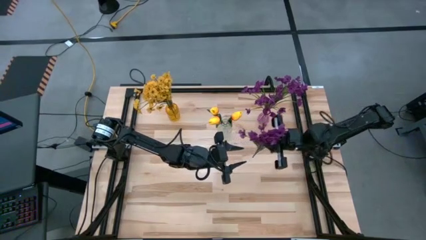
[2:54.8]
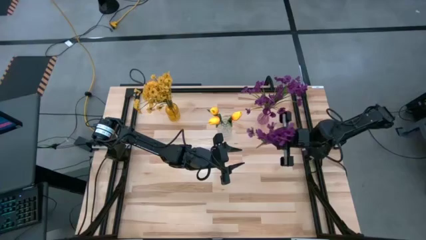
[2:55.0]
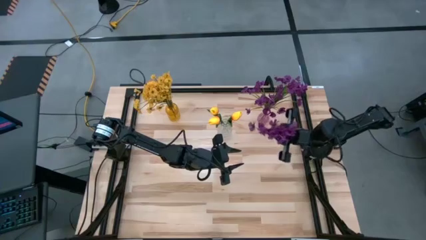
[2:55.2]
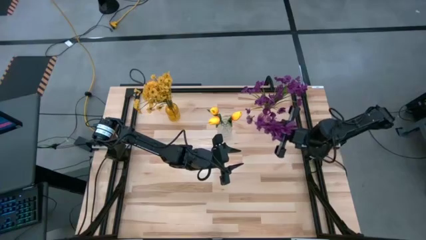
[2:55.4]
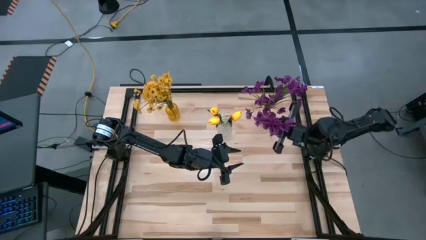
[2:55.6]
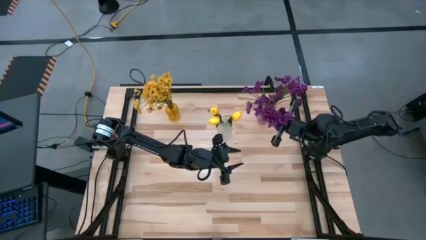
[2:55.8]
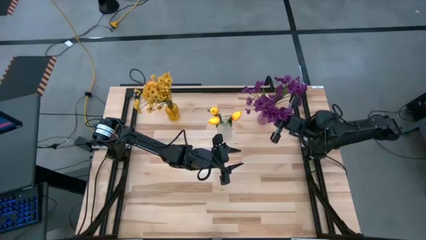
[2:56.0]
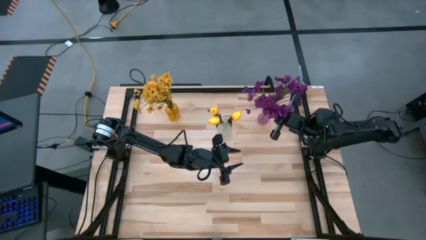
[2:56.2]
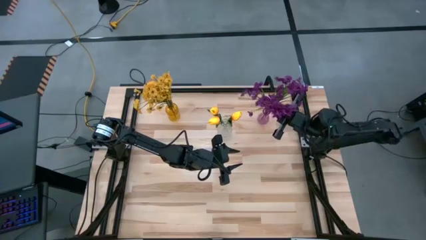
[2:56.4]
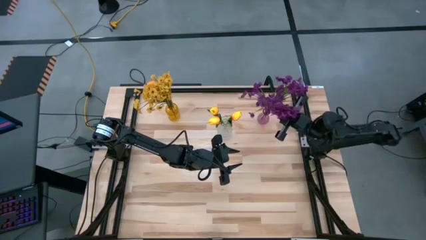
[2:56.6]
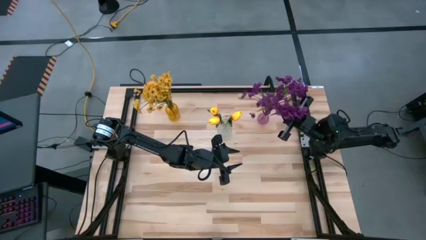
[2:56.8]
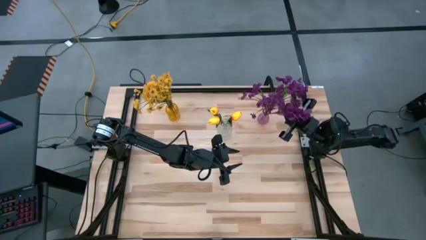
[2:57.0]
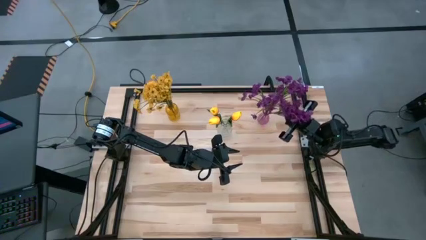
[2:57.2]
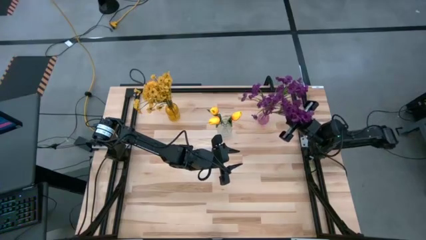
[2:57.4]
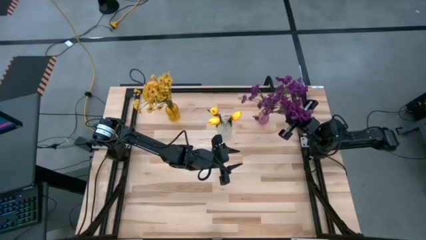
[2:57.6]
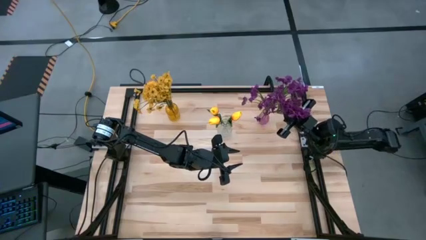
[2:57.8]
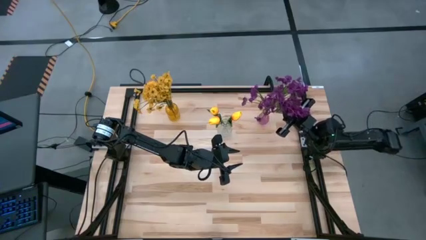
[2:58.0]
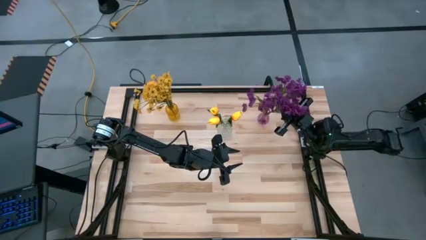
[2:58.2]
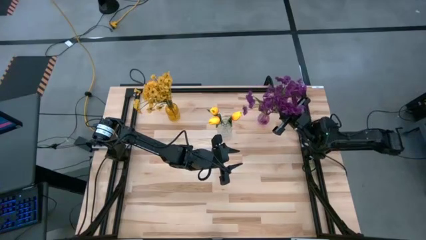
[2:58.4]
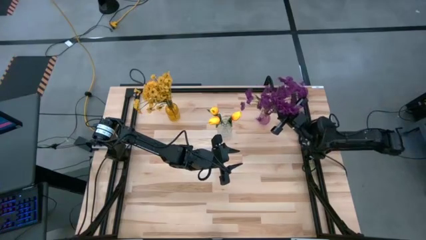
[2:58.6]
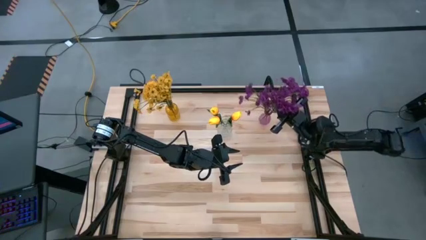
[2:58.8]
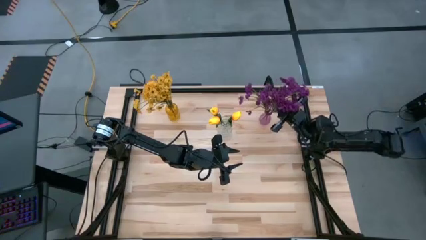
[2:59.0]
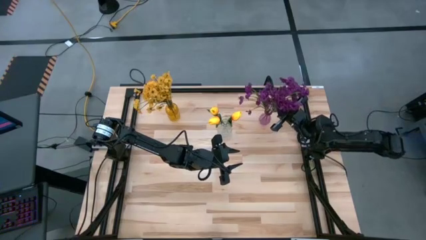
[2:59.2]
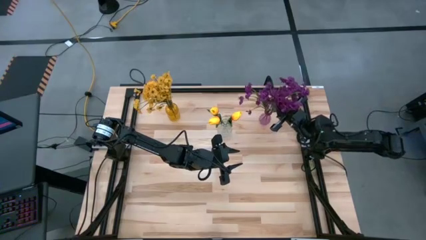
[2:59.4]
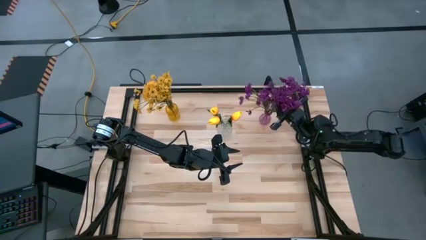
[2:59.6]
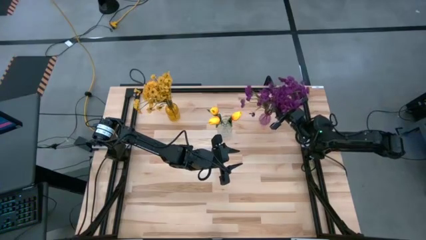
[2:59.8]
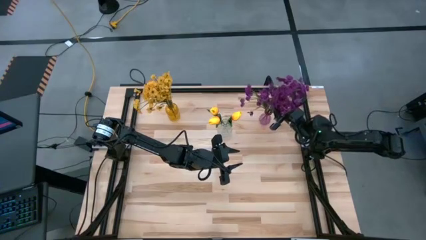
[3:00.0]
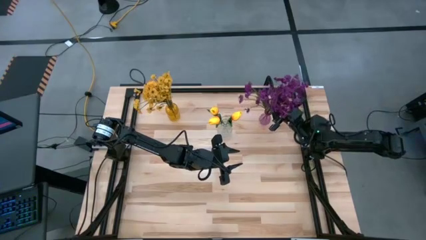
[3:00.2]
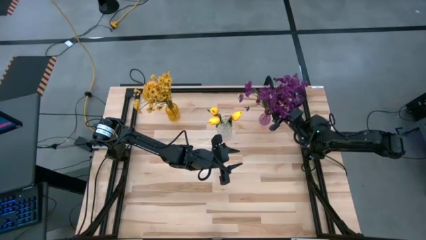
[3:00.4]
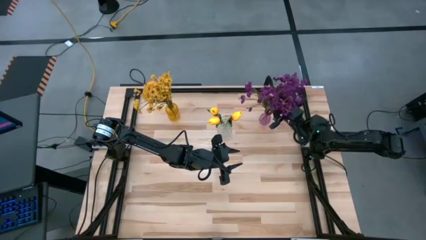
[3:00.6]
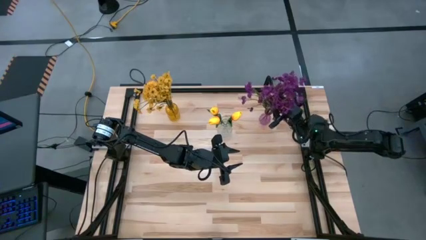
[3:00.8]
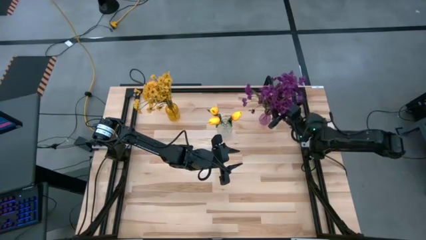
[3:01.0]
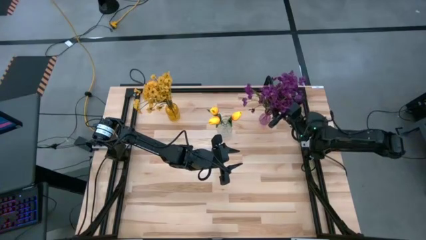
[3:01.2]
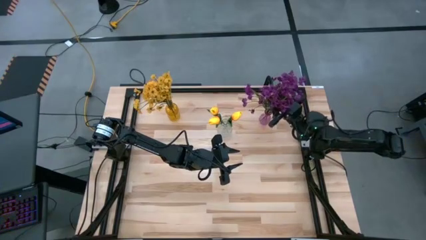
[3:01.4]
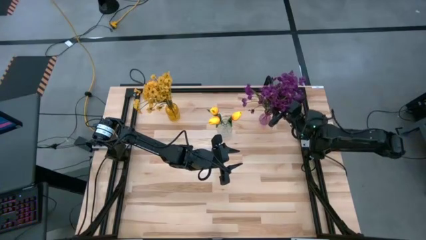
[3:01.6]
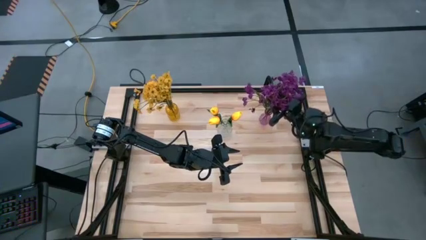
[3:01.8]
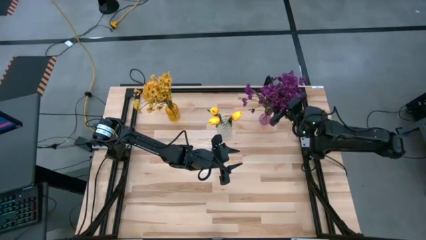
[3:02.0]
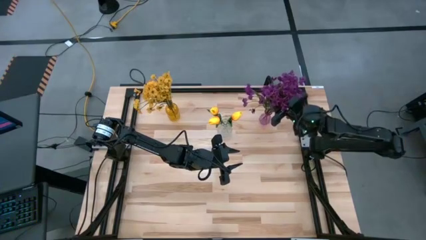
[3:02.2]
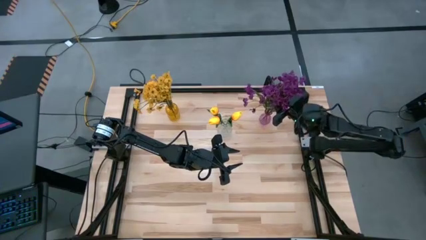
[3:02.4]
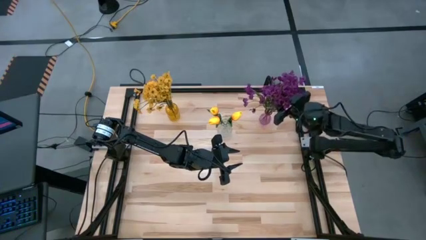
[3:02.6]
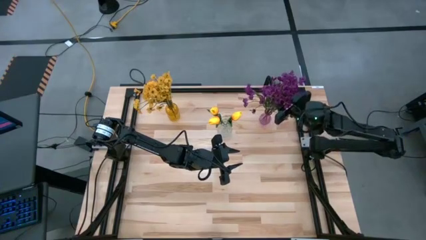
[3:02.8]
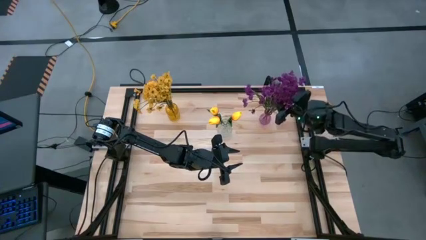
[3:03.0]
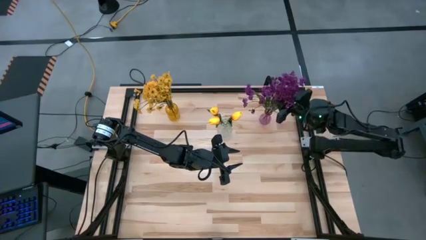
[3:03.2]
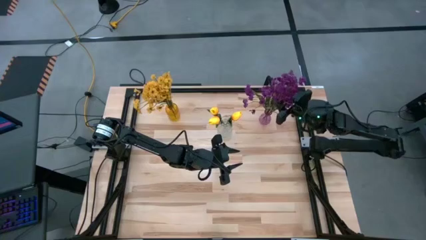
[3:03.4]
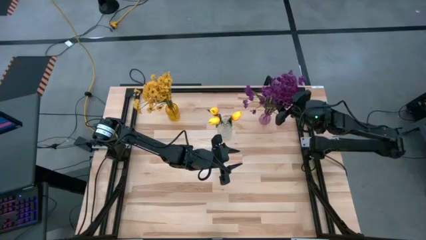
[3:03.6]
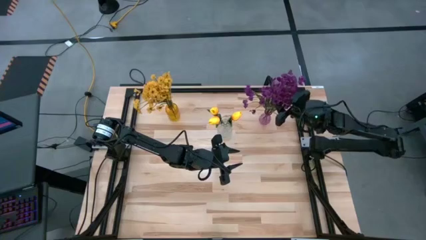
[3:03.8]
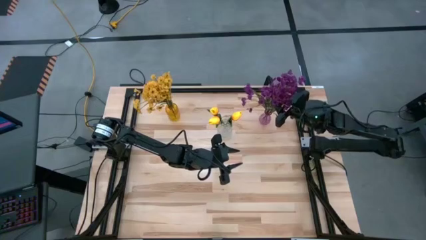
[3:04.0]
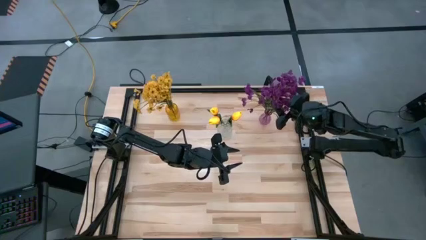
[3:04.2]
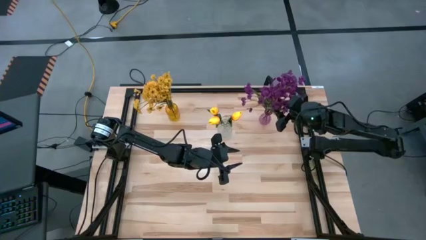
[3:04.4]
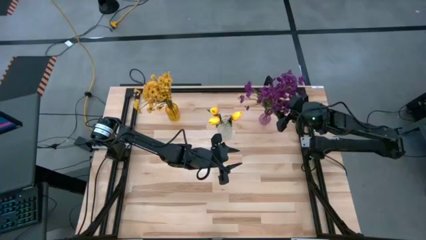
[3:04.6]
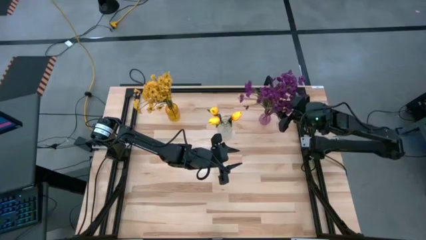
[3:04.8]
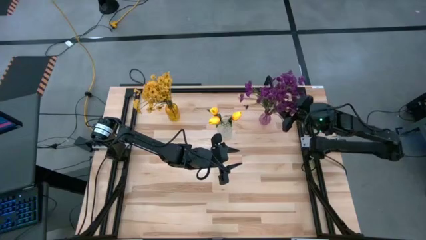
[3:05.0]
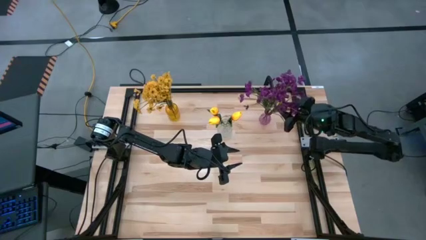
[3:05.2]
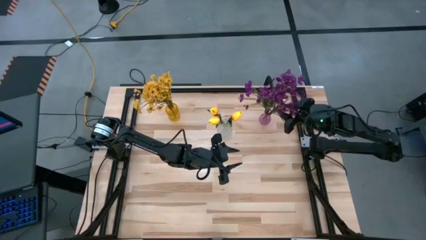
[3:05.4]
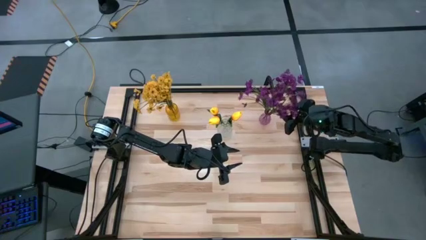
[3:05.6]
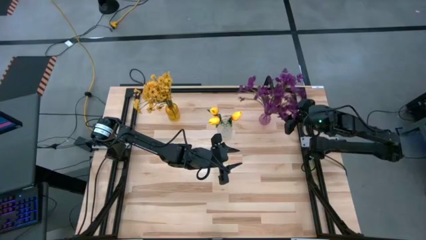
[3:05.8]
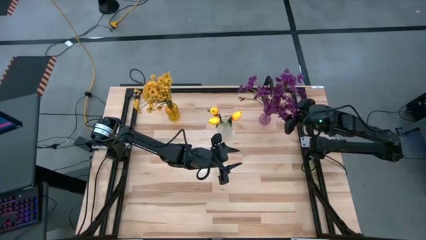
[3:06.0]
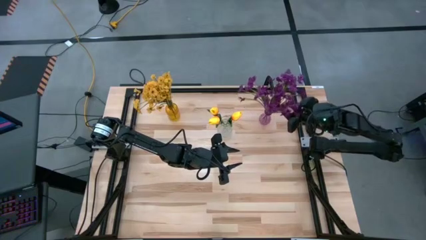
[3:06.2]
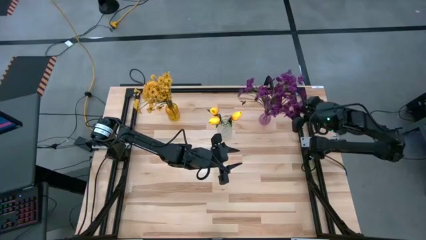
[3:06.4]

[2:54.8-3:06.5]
Task: Sort flowers into vase by color
Put the violet flowers into the pink vase
